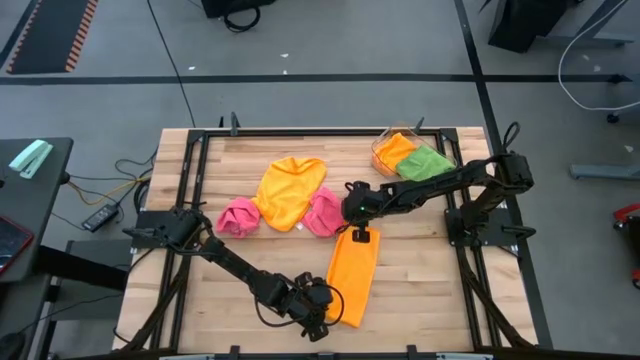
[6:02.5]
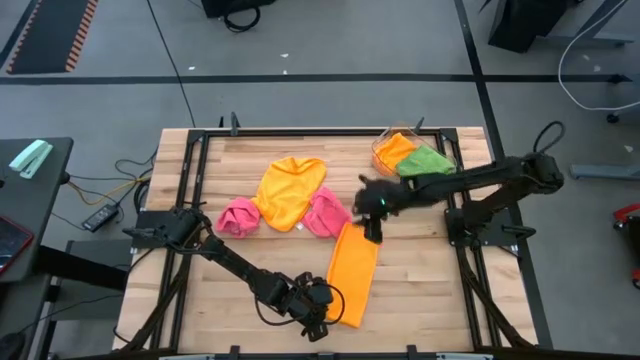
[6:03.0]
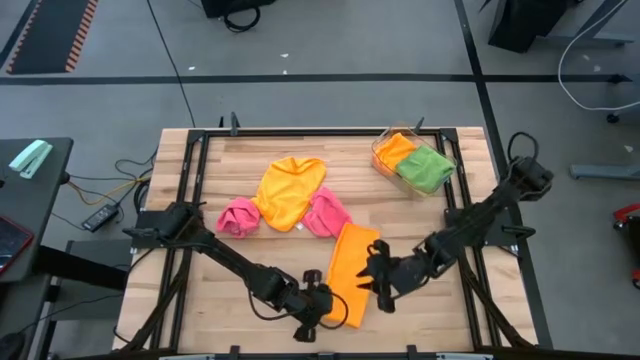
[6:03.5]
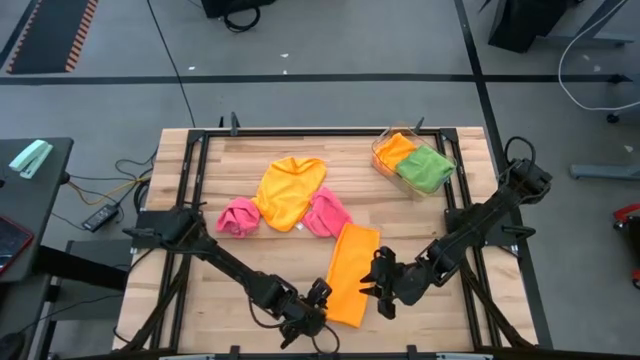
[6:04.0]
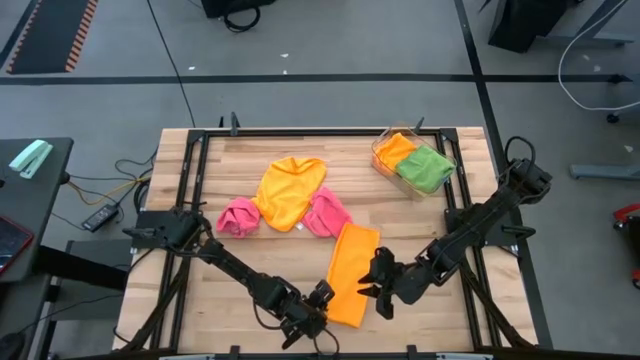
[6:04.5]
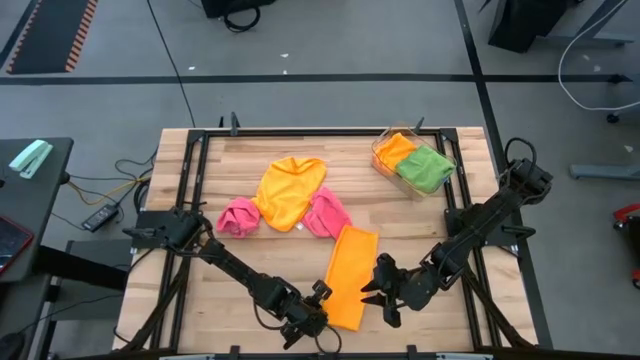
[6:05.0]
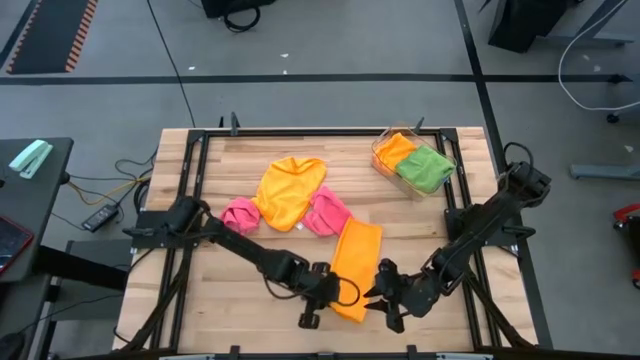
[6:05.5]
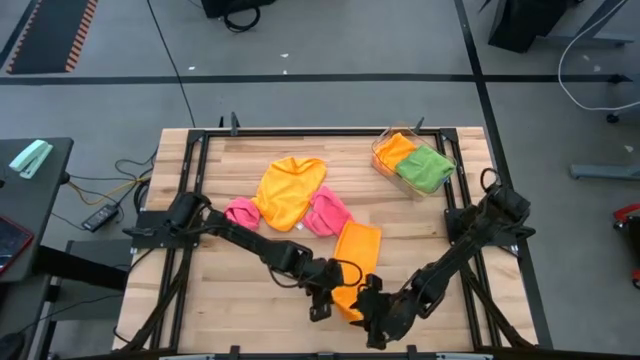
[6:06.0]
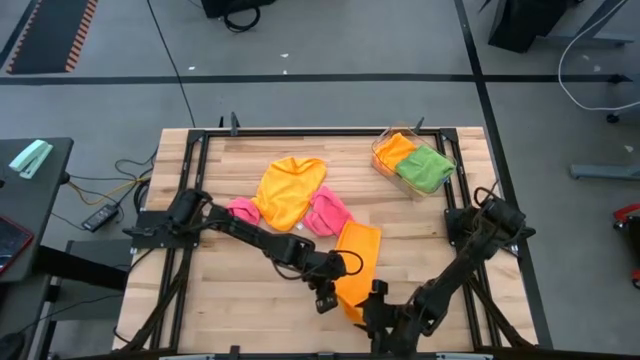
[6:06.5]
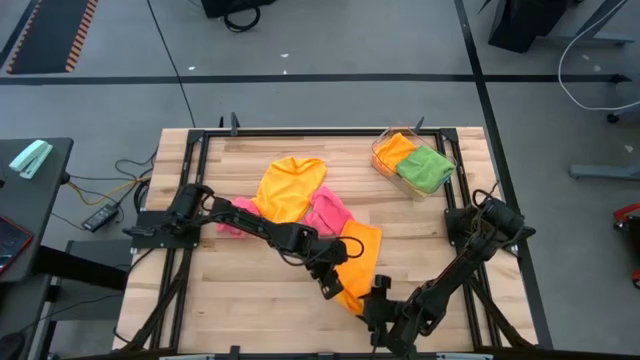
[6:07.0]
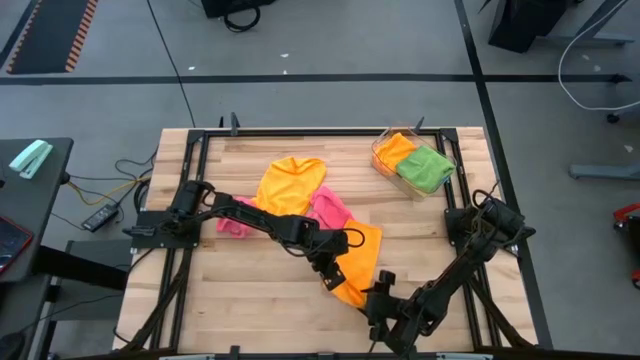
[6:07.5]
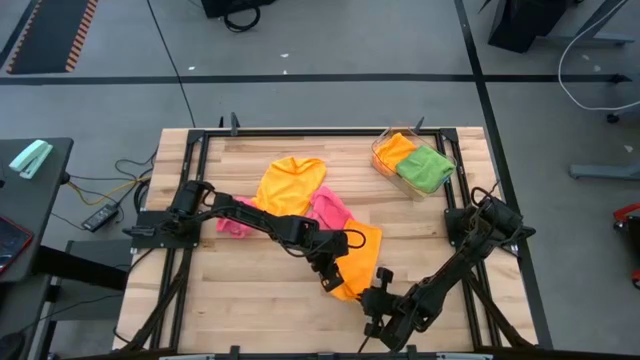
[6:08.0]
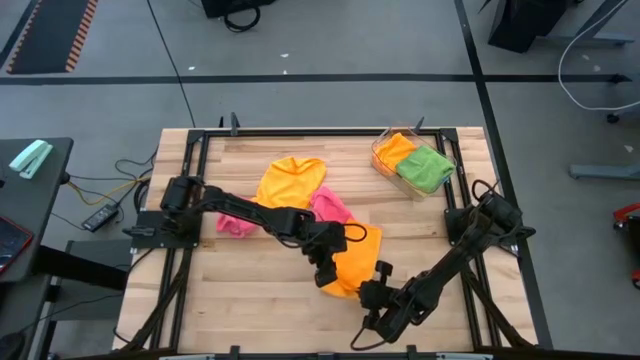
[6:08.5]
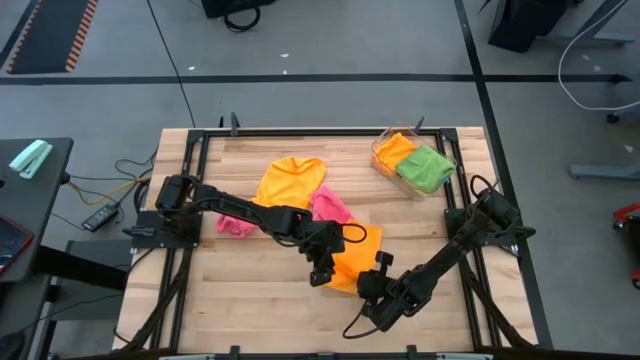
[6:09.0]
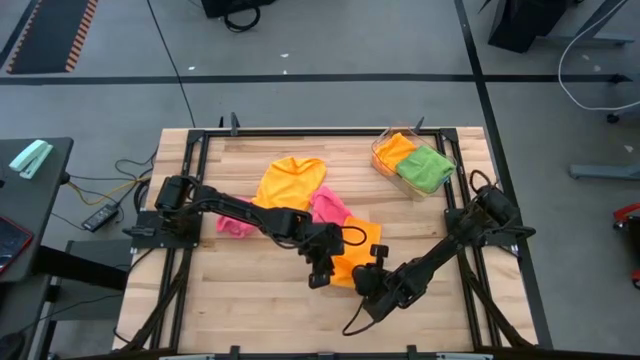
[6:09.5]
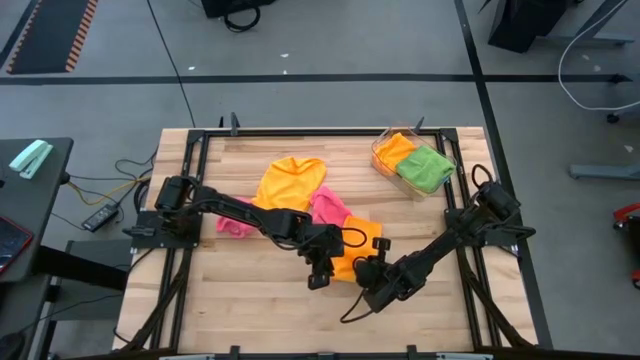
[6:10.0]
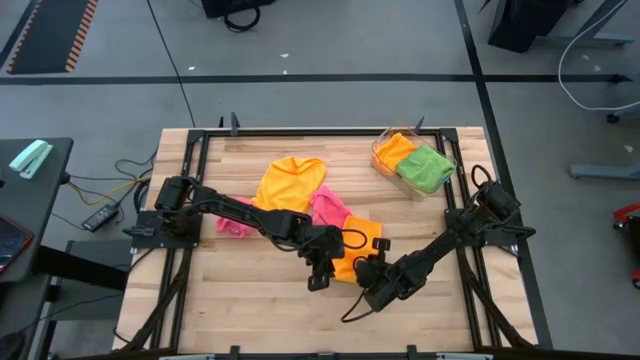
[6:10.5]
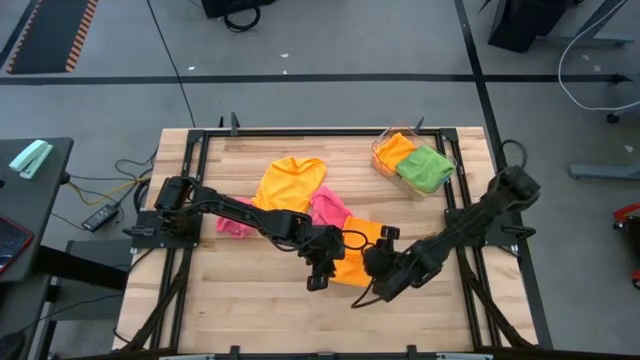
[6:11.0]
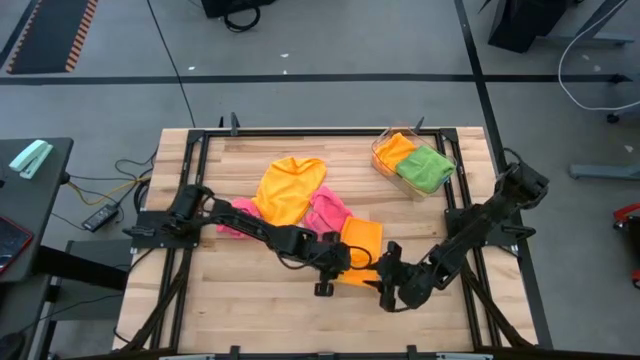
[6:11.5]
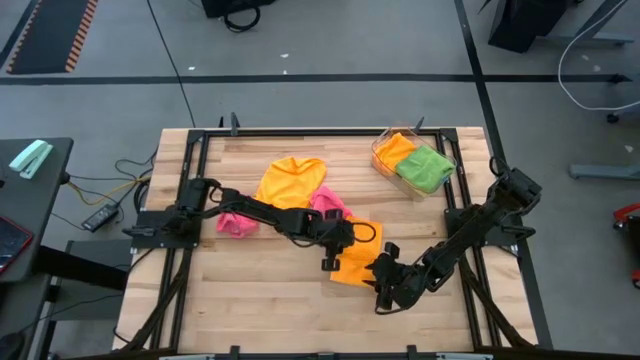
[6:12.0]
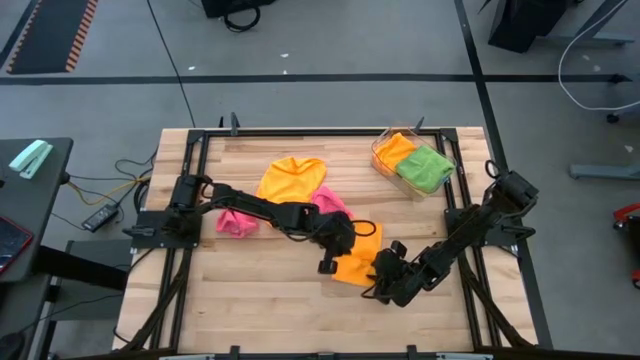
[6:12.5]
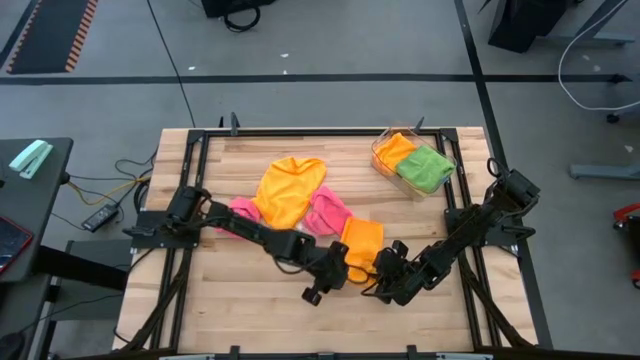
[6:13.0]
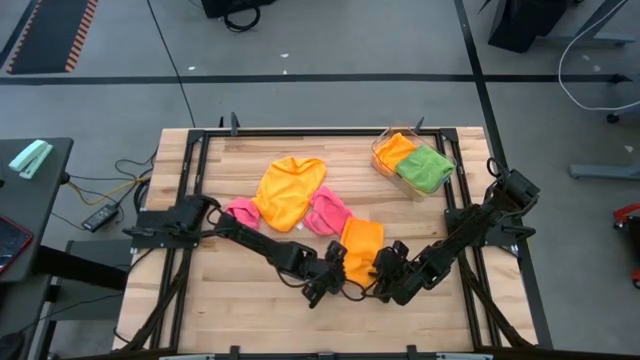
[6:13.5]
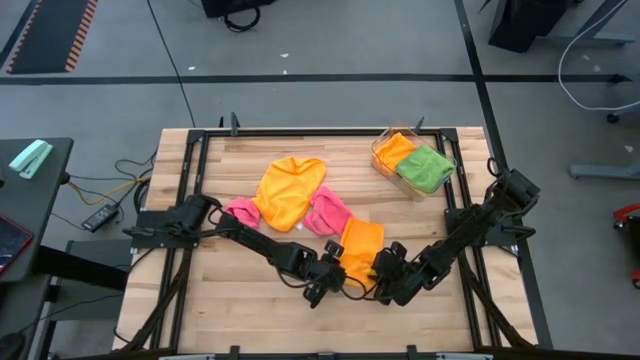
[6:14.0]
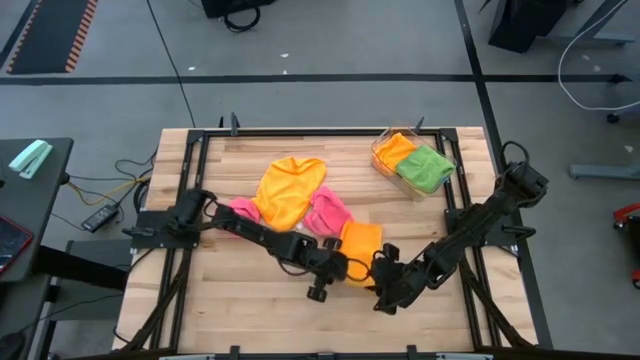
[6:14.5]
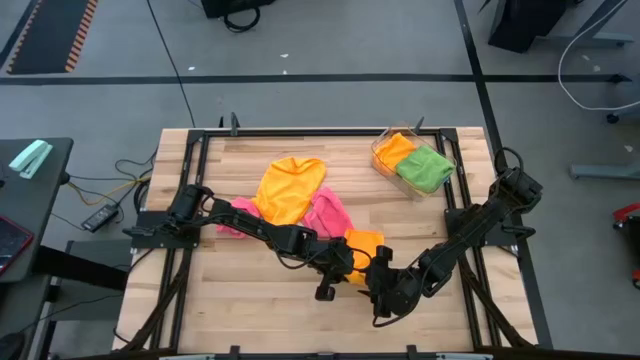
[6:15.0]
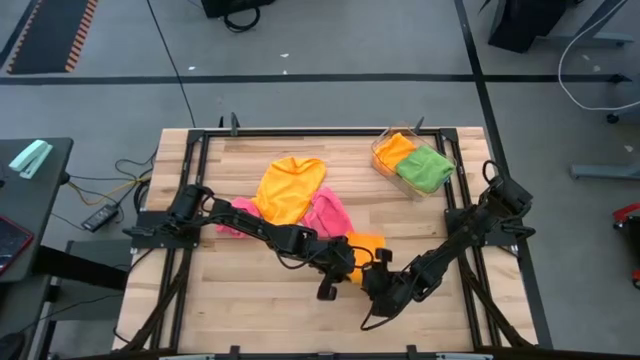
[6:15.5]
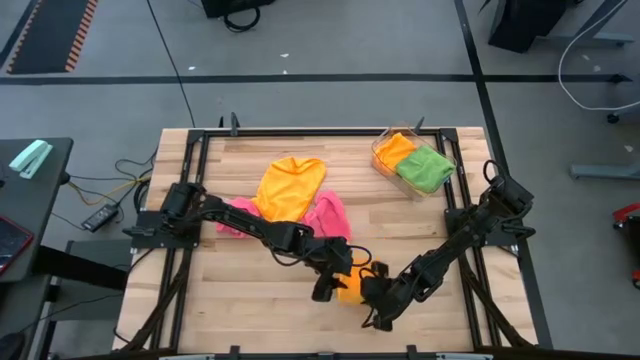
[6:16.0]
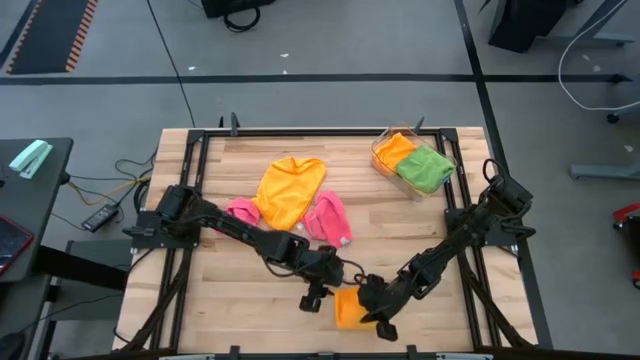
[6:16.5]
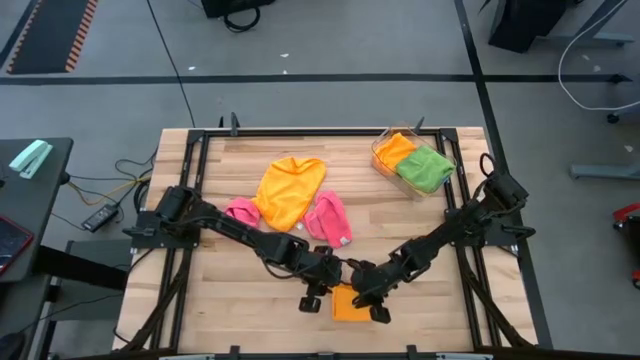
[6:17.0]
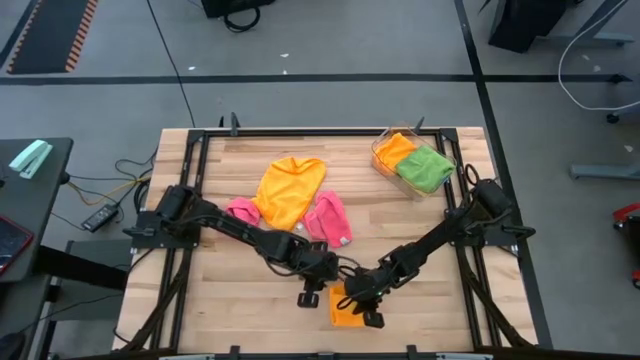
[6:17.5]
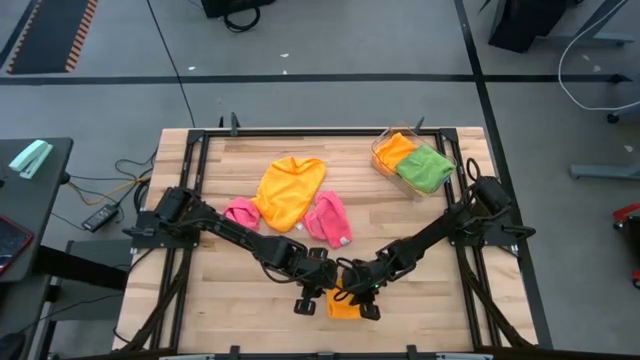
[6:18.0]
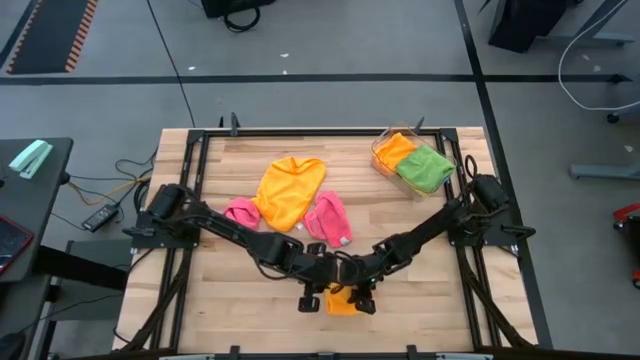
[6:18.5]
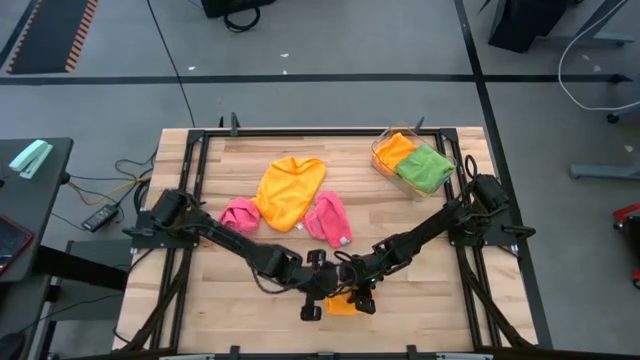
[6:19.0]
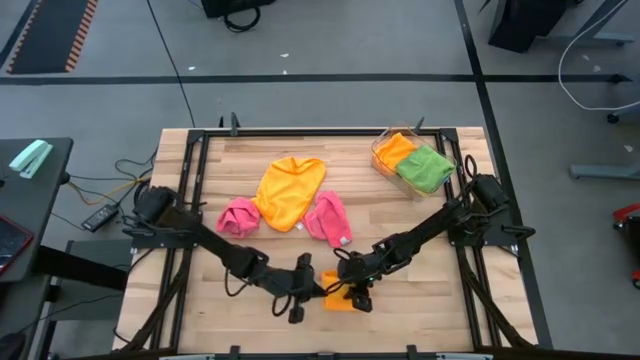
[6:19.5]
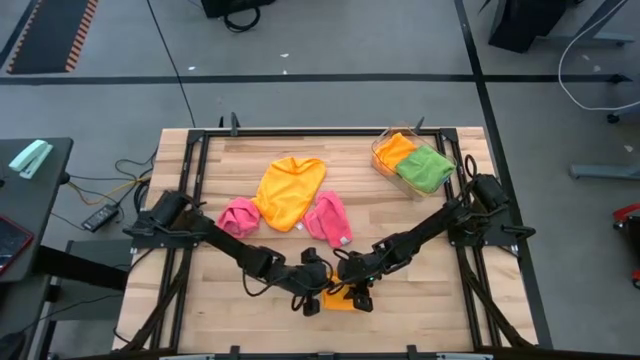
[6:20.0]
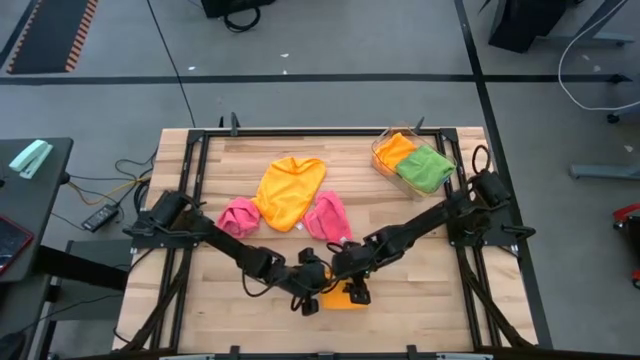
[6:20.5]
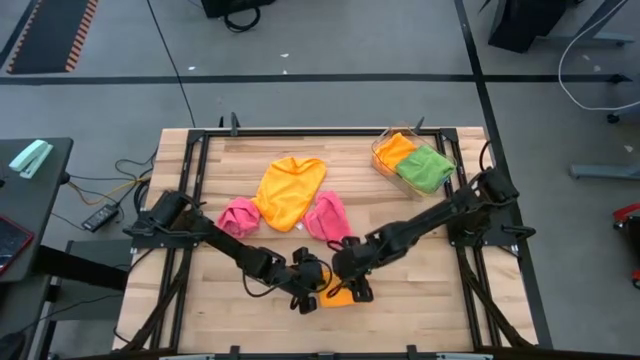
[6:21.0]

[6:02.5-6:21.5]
Task: Fold microfiber towels
Fold the bottom orange towel

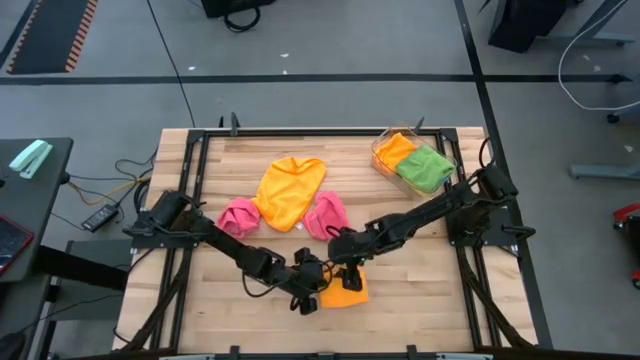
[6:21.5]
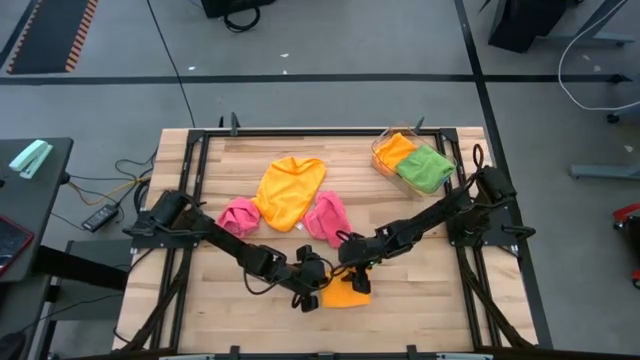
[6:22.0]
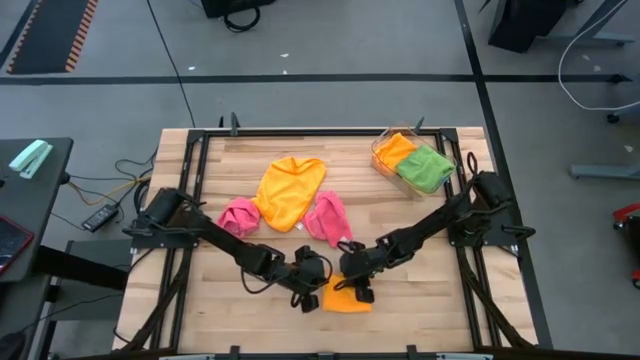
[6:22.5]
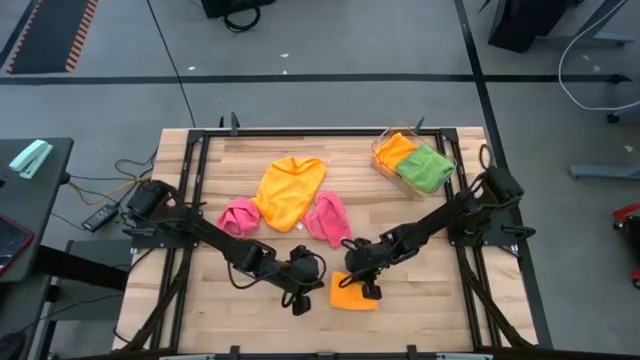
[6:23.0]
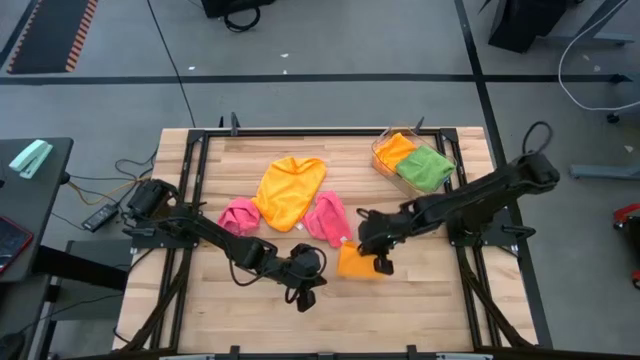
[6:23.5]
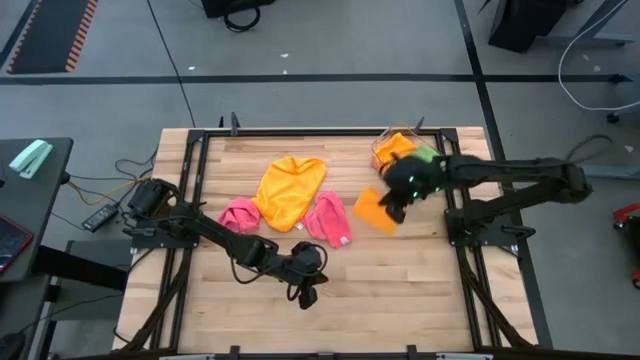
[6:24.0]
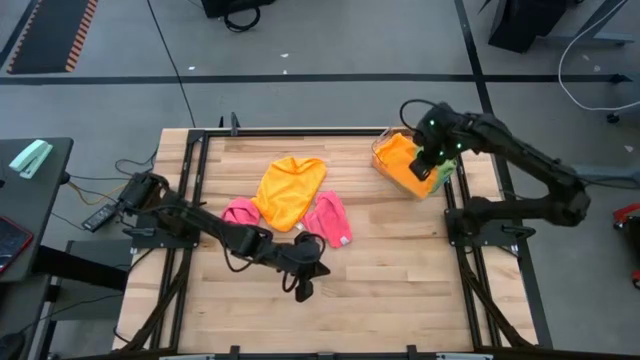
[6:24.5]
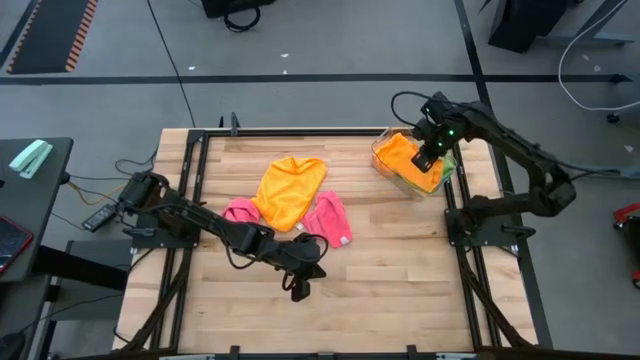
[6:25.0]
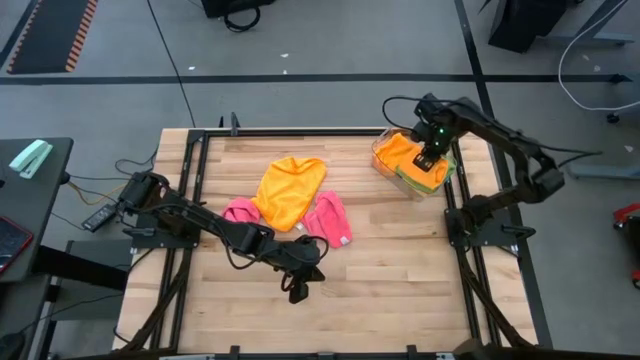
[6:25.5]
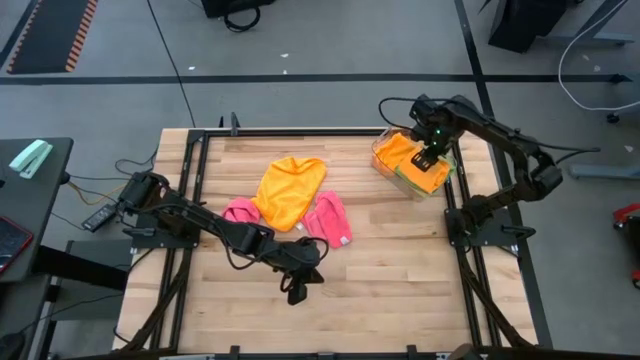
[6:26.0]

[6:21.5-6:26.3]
Put the bottom orange towel into the transparent bin
